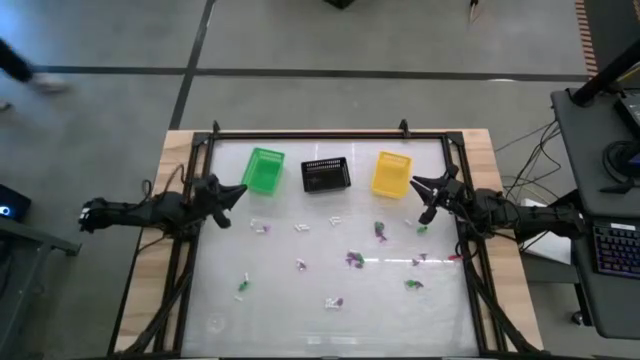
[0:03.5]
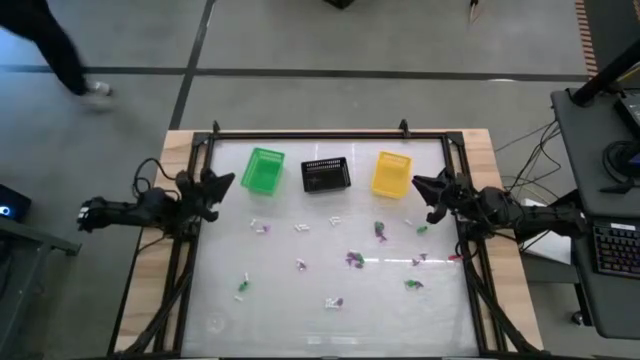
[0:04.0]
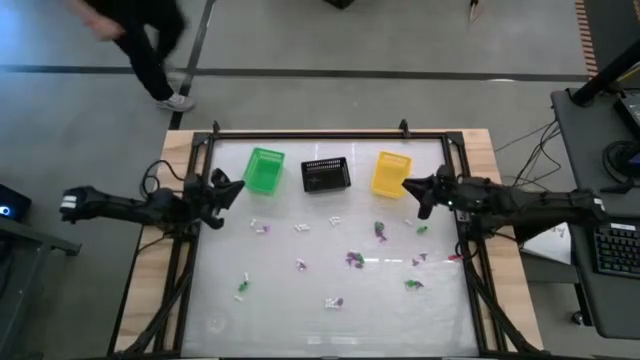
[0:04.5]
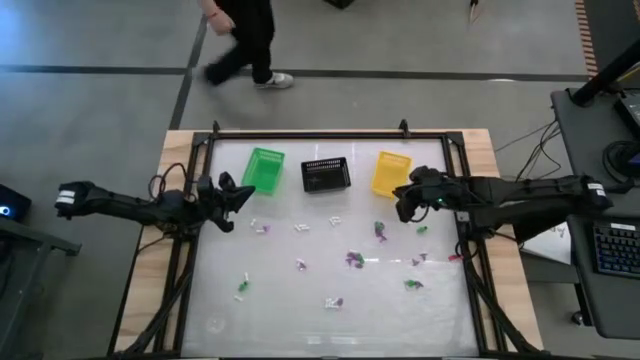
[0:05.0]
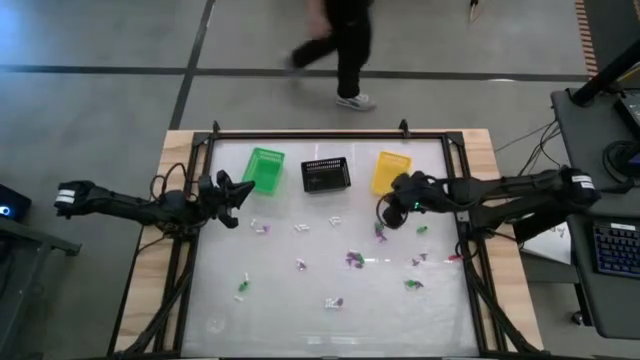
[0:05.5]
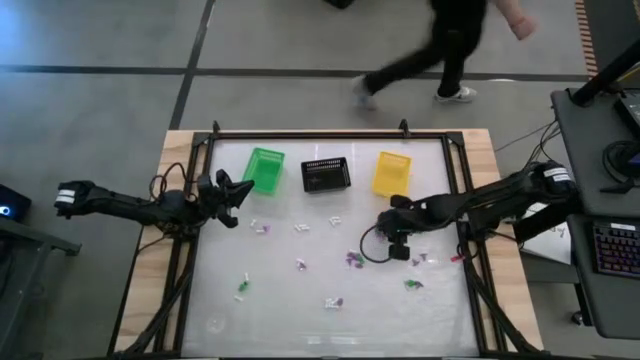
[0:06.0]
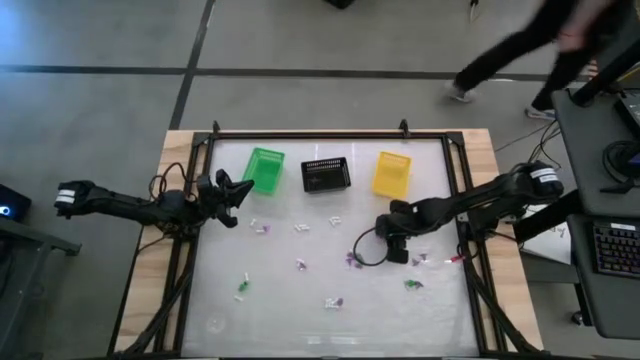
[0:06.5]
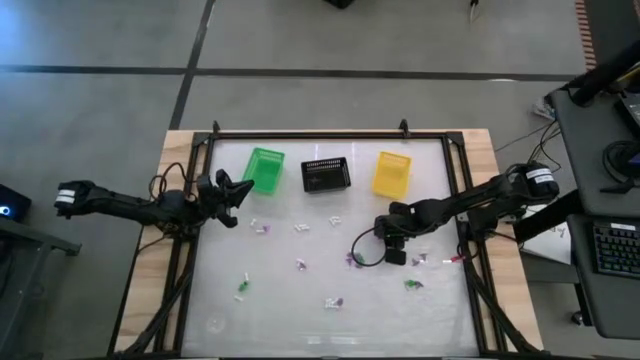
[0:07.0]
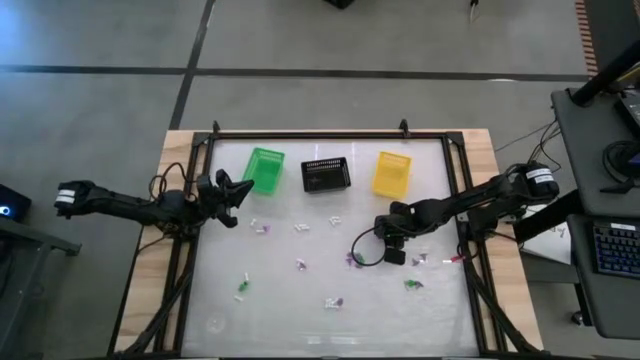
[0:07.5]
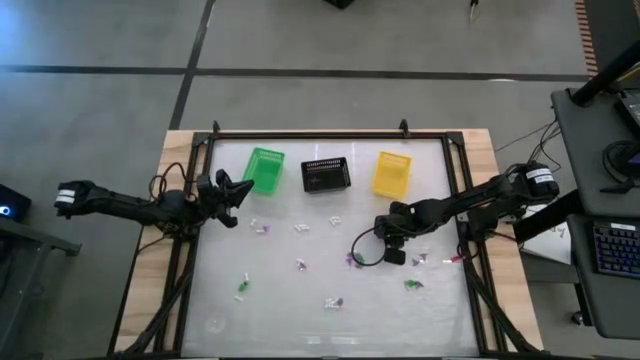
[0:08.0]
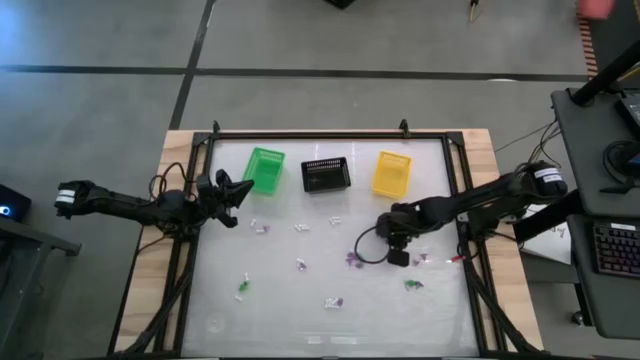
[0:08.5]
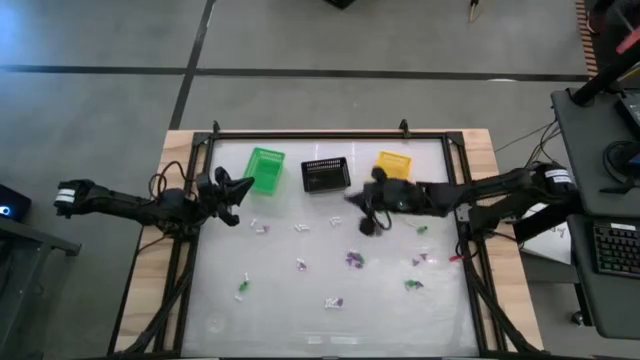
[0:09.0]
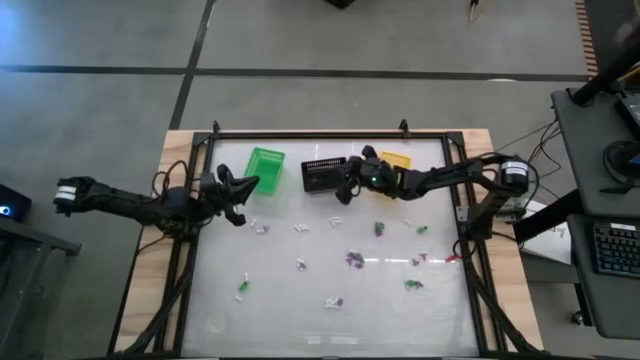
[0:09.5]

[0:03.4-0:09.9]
Task: Sort Halloween decoration
Put the purple witch hat toy into the black basket

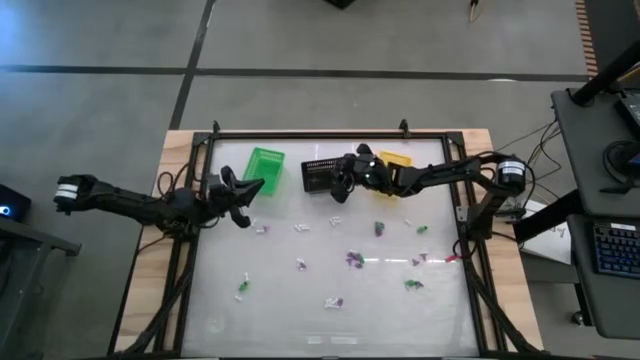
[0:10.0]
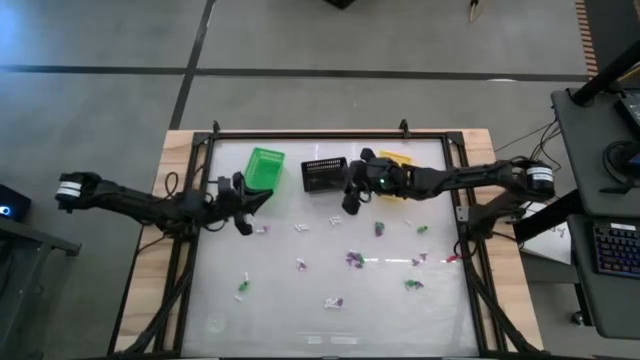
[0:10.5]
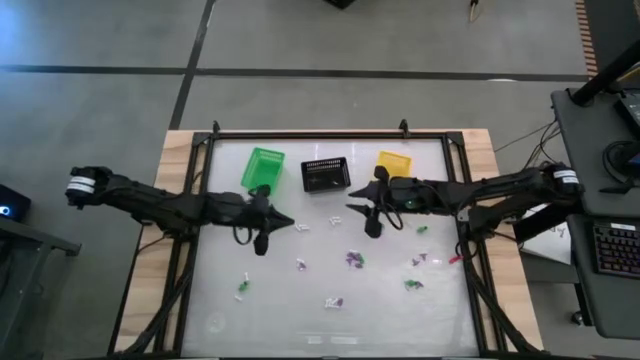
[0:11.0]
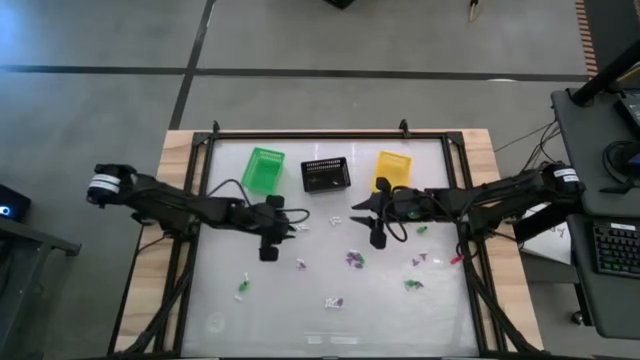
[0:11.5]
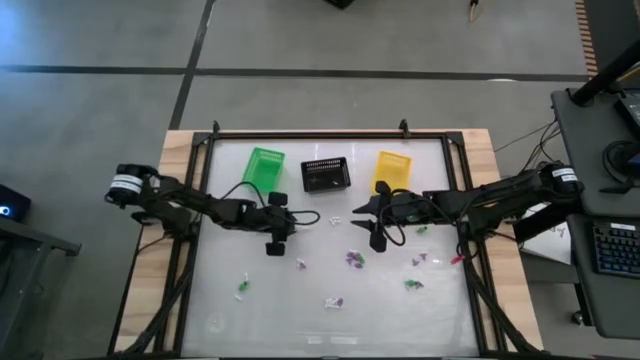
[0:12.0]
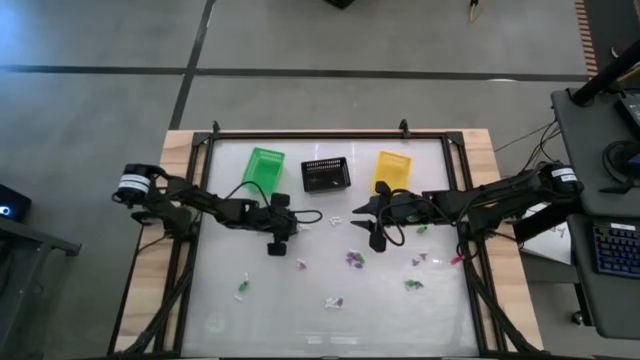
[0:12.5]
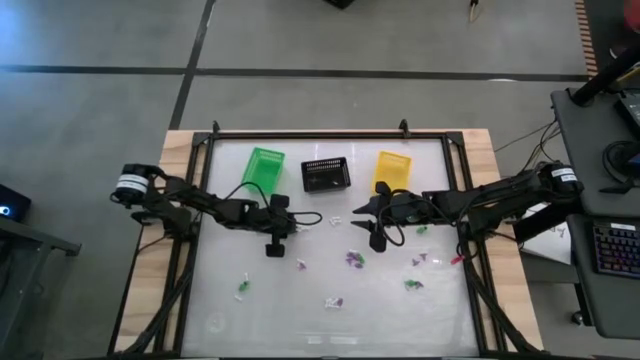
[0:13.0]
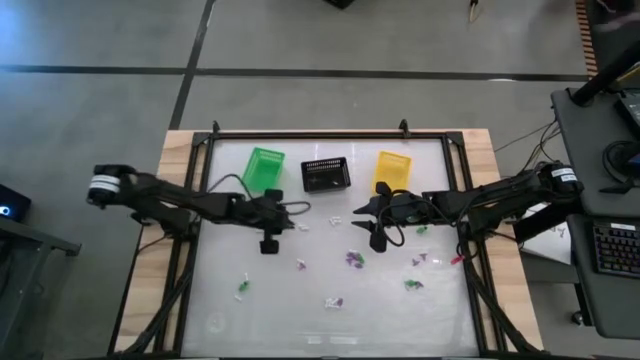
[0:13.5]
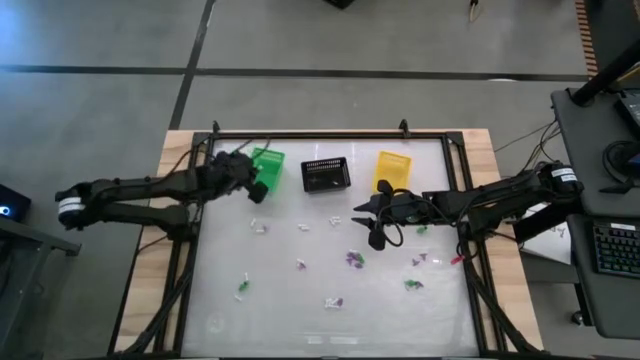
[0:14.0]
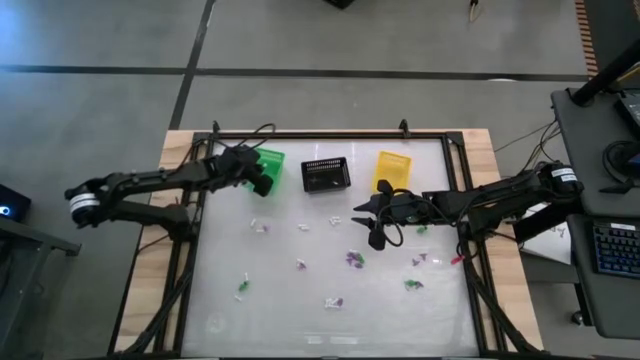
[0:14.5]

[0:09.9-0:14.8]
Put the white bone toy into the green basket

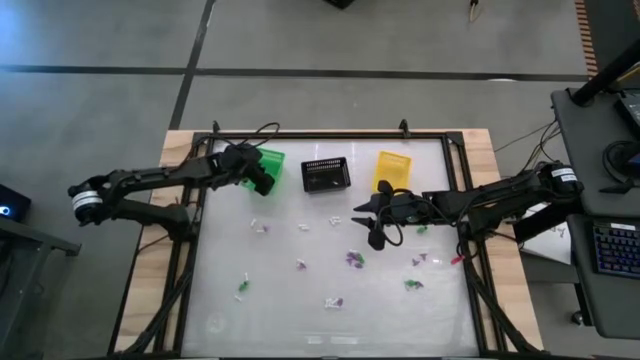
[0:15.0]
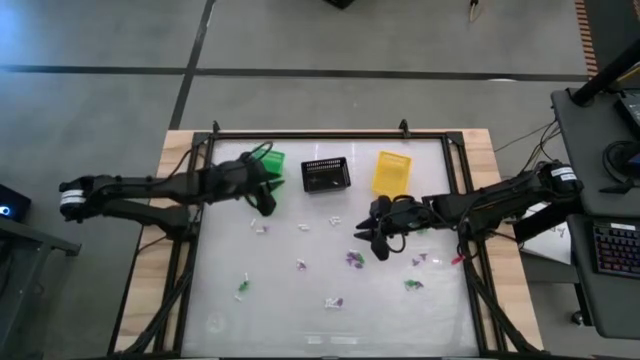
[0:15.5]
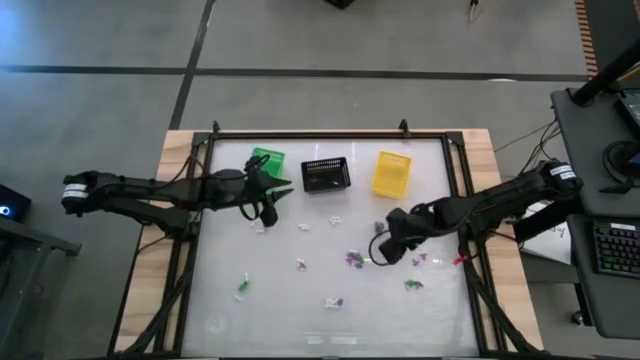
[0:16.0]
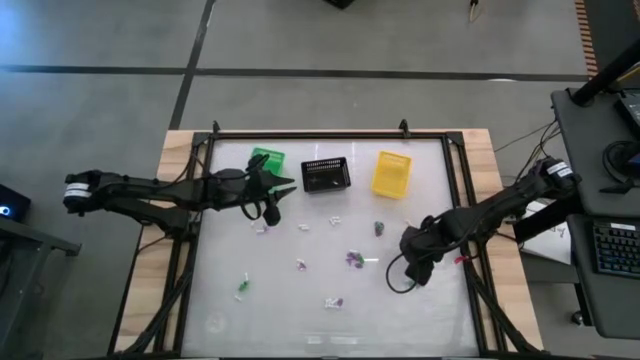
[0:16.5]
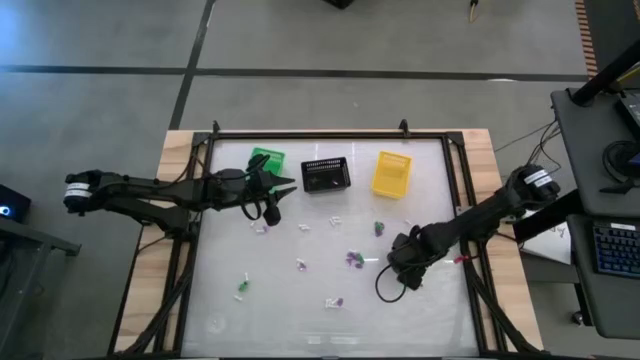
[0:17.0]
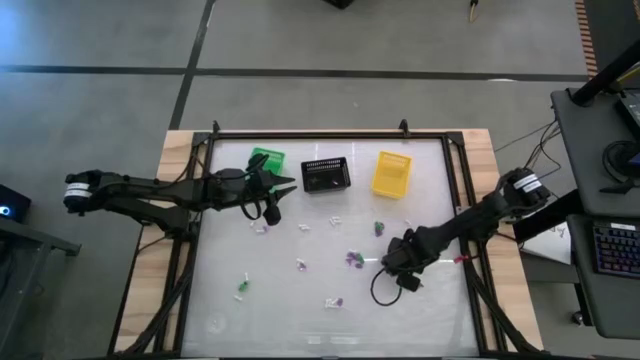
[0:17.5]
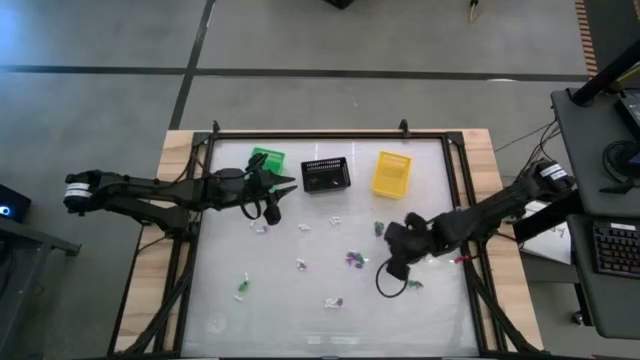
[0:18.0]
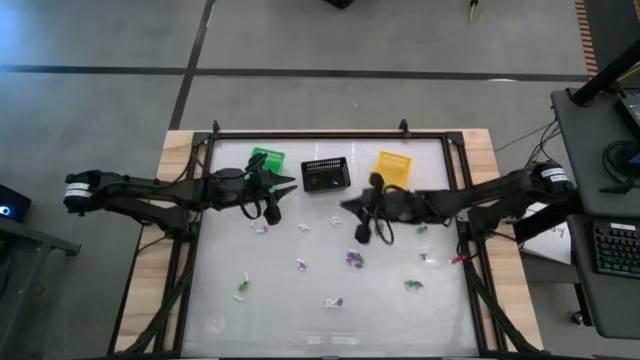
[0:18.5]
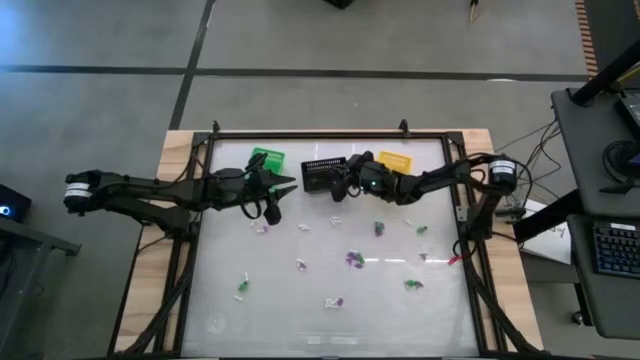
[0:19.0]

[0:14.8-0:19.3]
Put the purple witch hat toy into the black basket

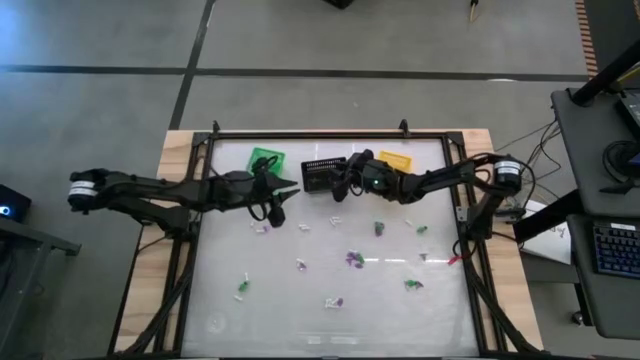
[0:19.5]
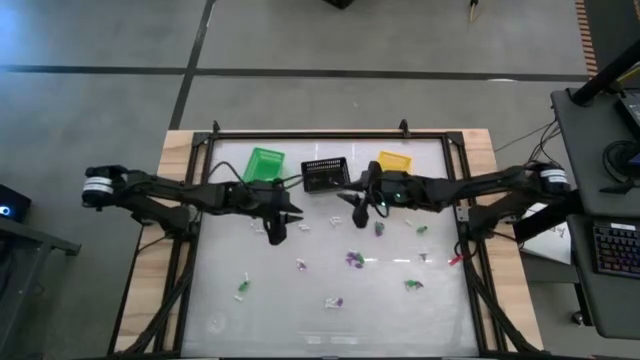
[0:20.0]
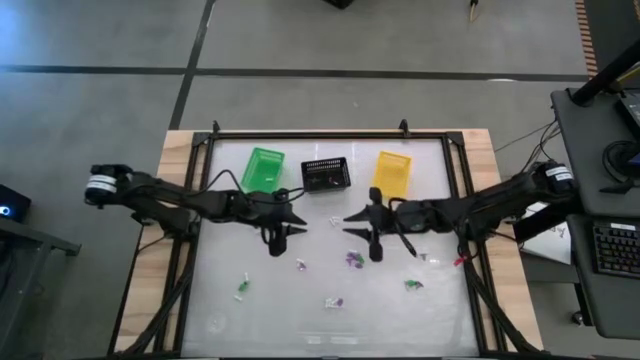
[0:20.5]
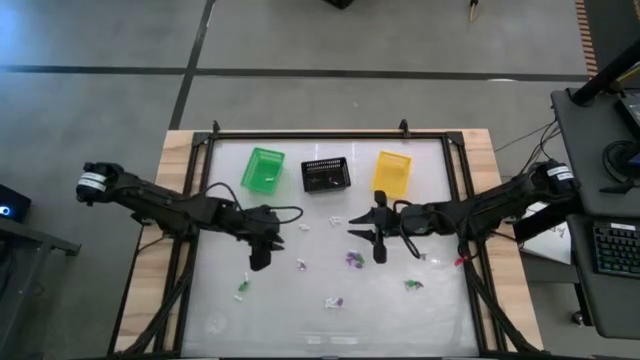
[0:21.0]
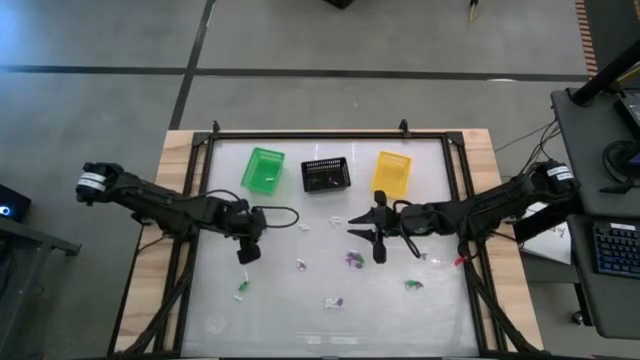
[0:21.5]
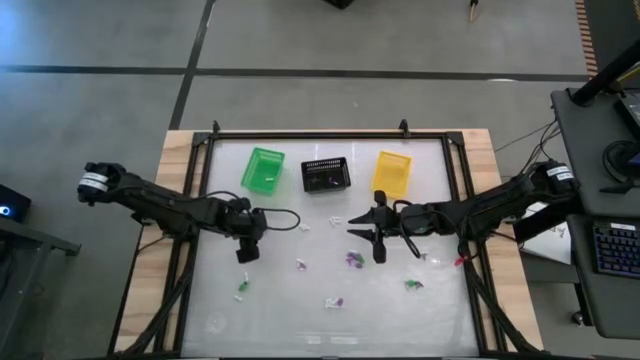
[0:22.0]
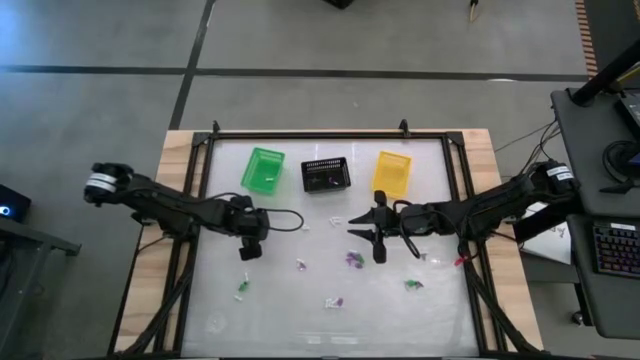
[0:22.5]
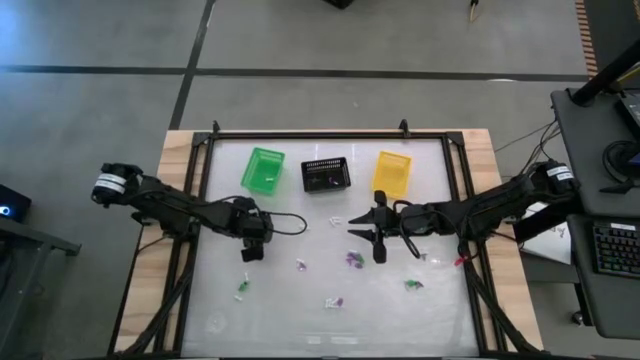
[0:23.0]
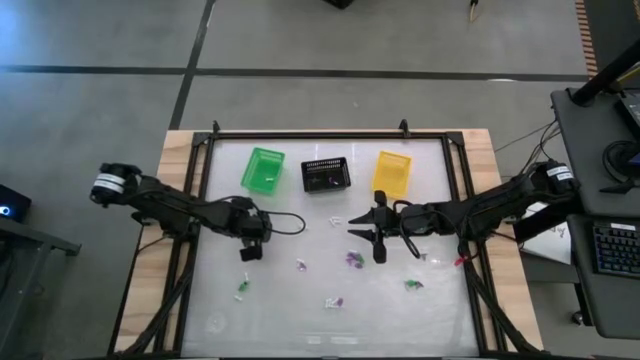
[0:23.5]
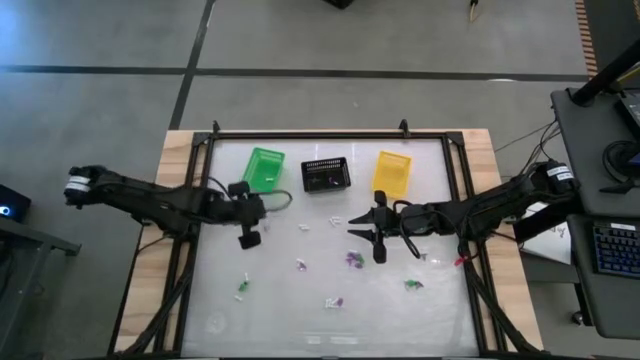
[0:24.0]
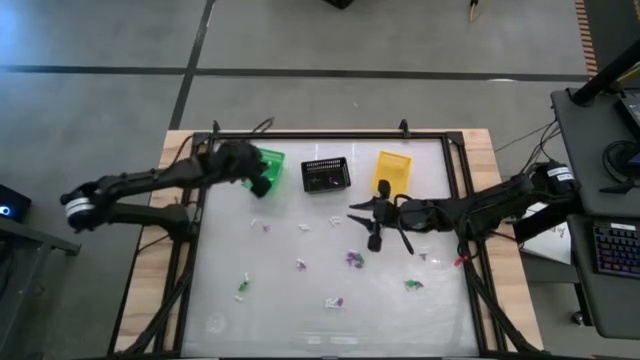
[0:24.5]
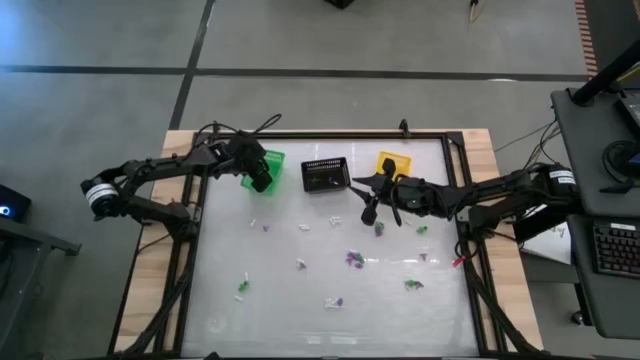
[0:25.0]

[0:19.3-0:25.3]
Put the white bone toy into the green basket
